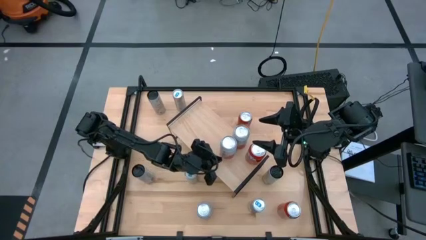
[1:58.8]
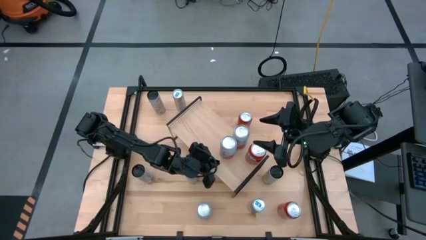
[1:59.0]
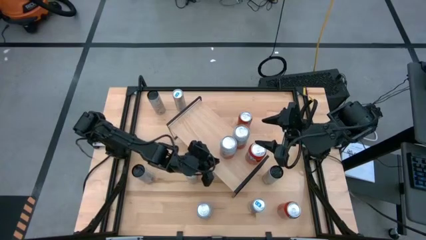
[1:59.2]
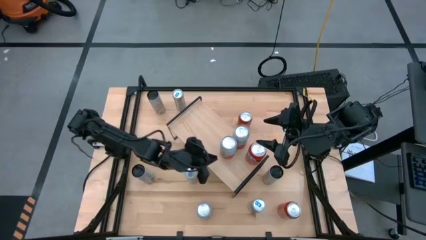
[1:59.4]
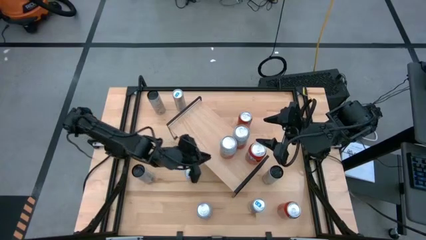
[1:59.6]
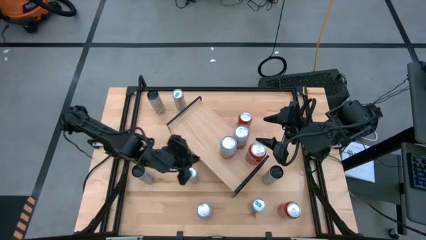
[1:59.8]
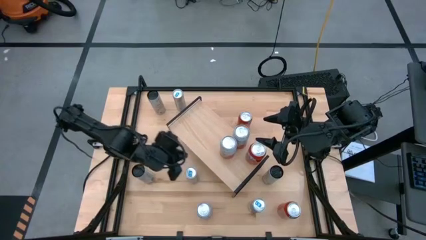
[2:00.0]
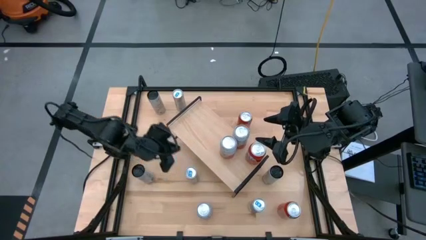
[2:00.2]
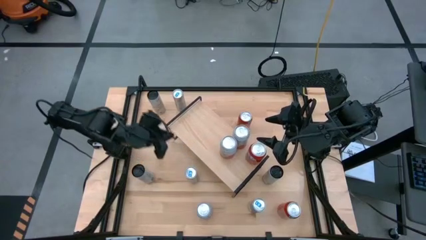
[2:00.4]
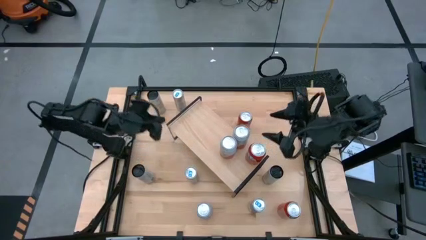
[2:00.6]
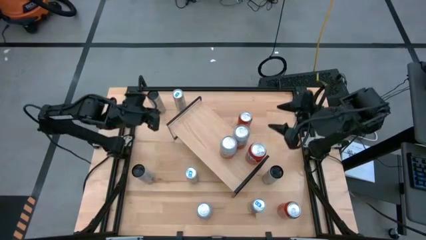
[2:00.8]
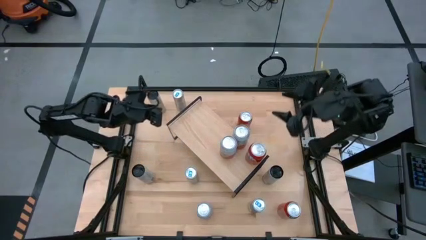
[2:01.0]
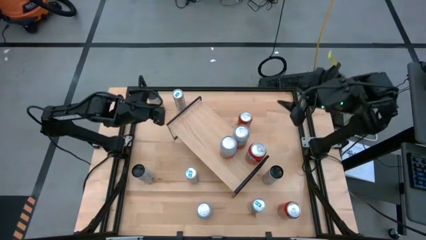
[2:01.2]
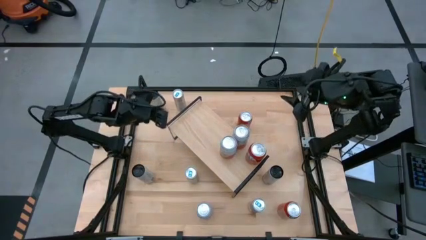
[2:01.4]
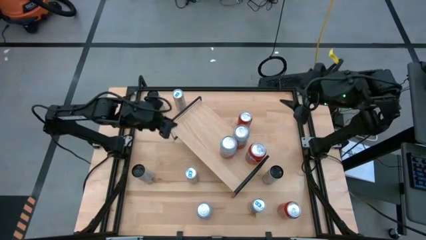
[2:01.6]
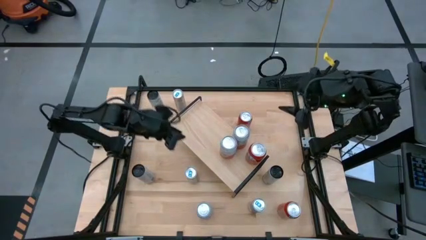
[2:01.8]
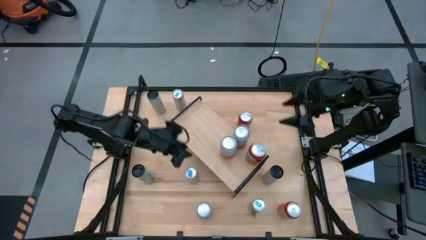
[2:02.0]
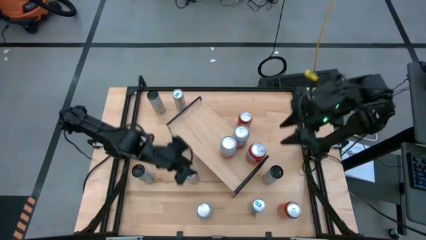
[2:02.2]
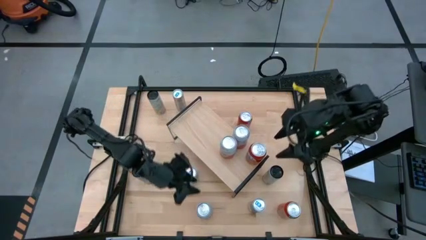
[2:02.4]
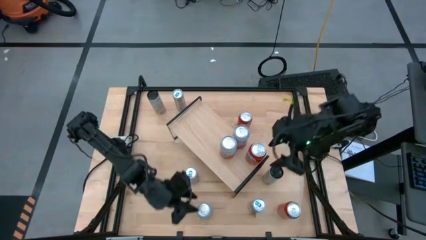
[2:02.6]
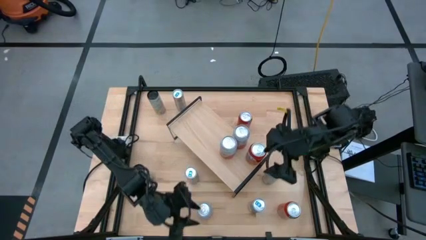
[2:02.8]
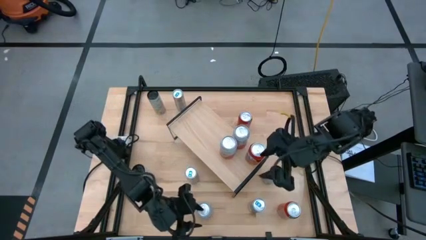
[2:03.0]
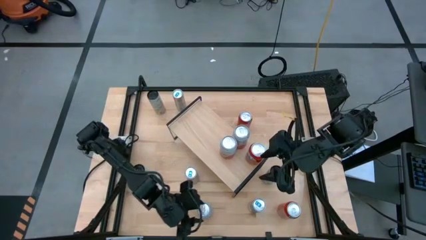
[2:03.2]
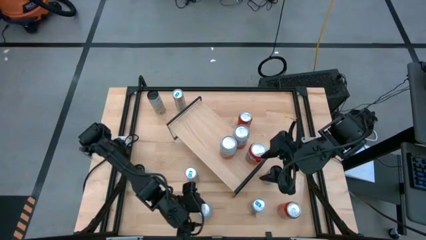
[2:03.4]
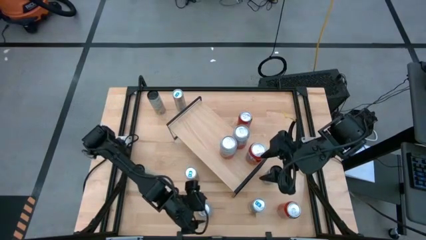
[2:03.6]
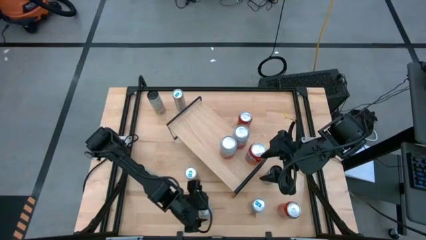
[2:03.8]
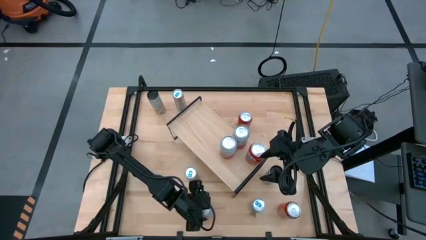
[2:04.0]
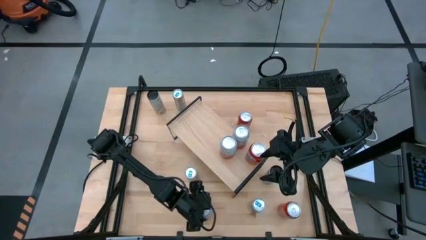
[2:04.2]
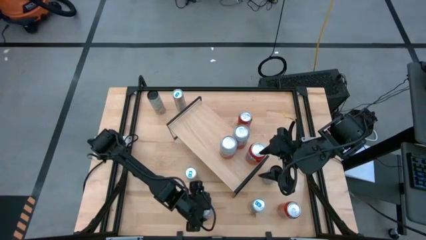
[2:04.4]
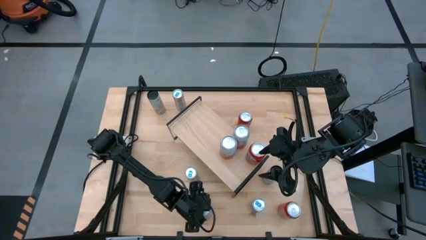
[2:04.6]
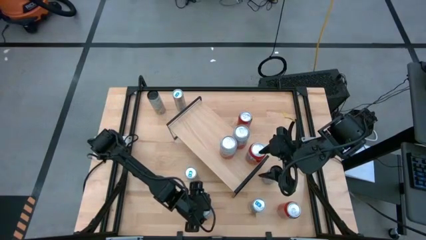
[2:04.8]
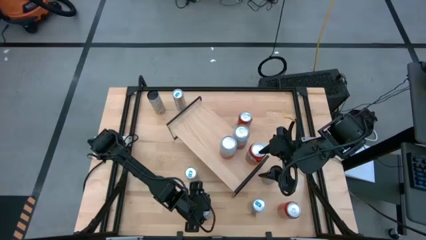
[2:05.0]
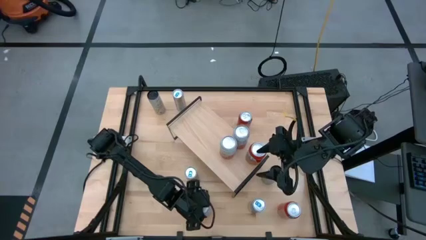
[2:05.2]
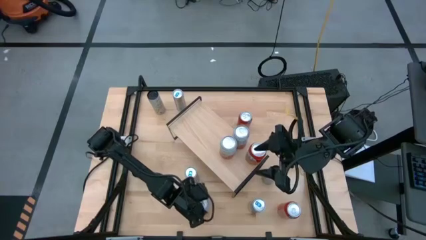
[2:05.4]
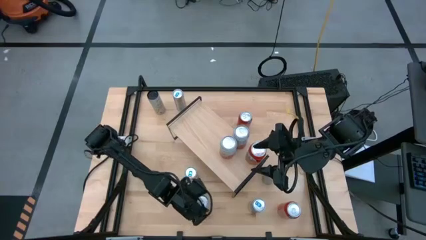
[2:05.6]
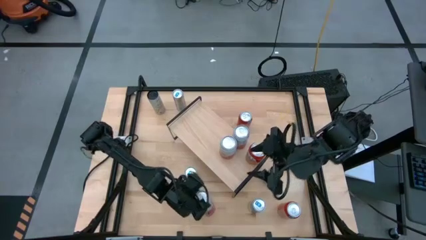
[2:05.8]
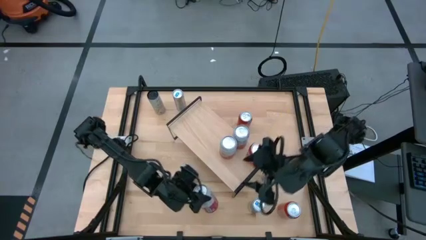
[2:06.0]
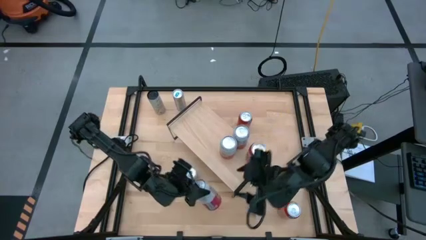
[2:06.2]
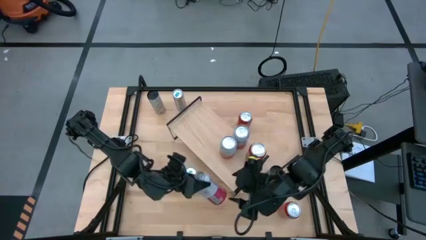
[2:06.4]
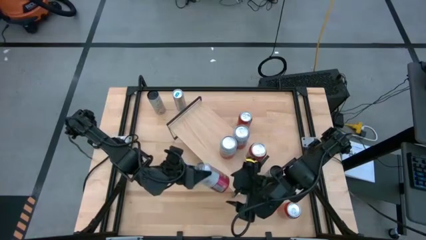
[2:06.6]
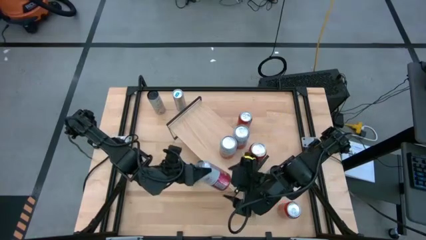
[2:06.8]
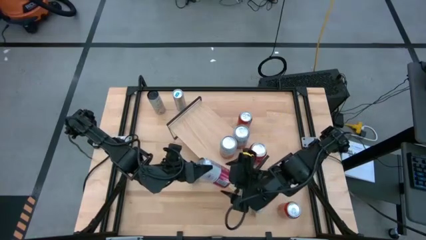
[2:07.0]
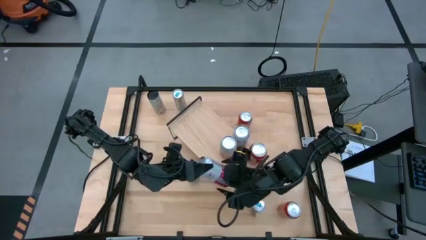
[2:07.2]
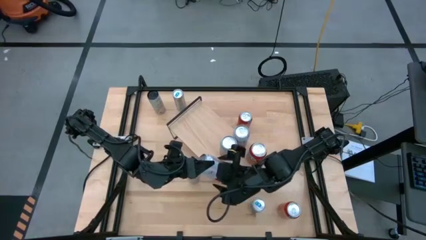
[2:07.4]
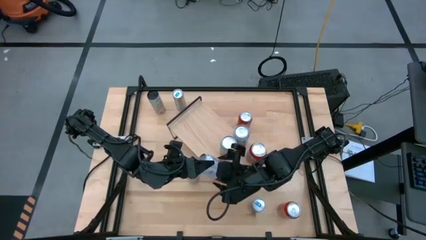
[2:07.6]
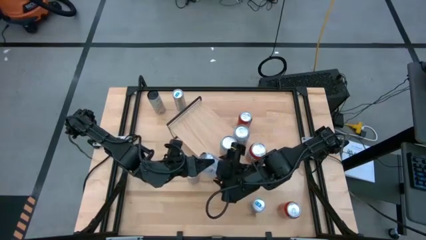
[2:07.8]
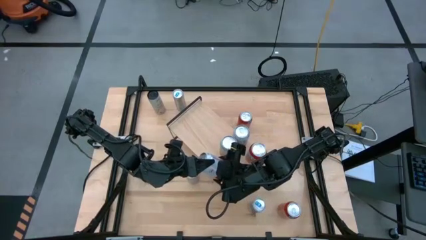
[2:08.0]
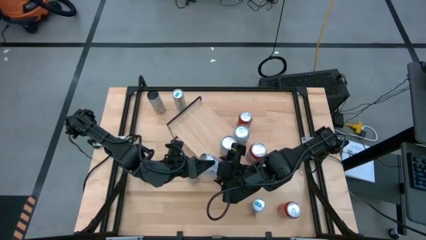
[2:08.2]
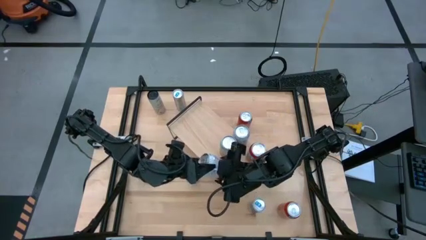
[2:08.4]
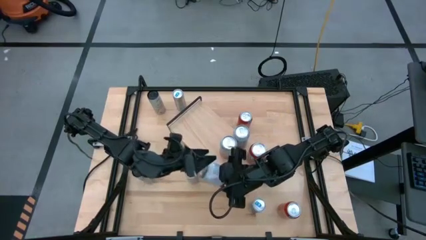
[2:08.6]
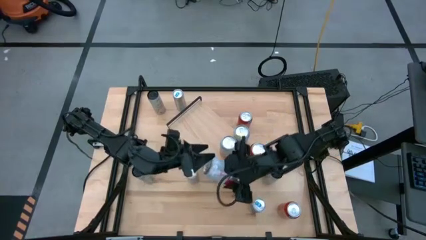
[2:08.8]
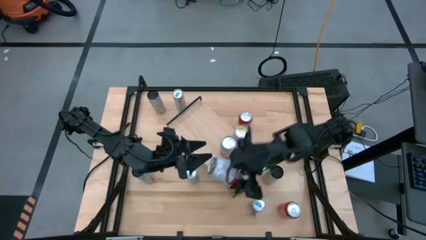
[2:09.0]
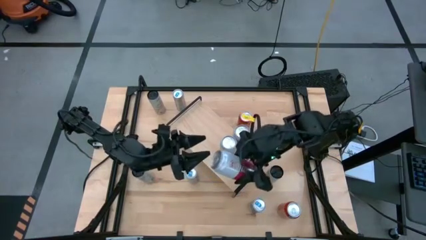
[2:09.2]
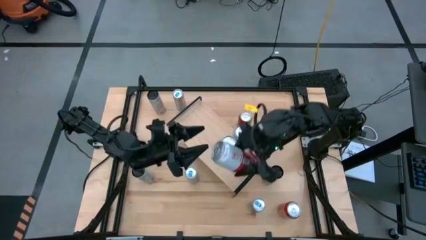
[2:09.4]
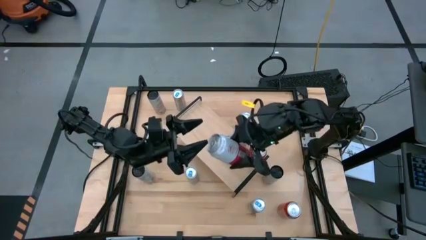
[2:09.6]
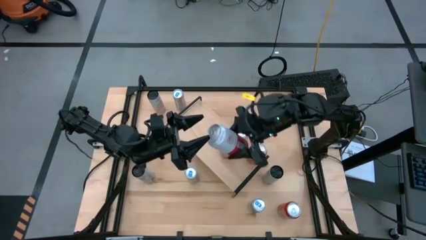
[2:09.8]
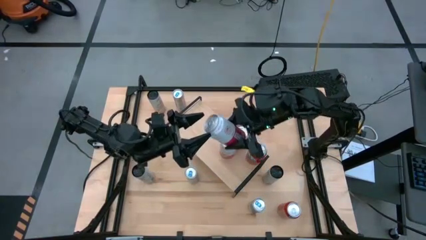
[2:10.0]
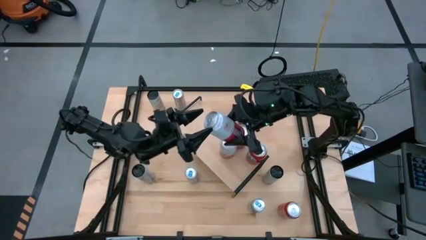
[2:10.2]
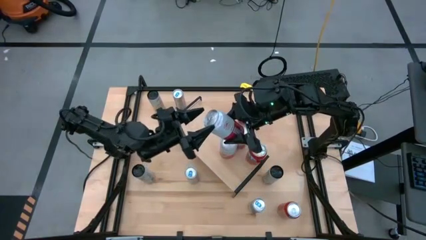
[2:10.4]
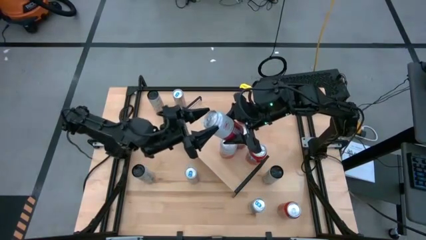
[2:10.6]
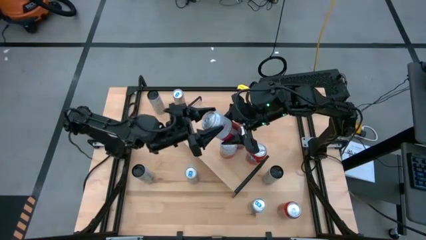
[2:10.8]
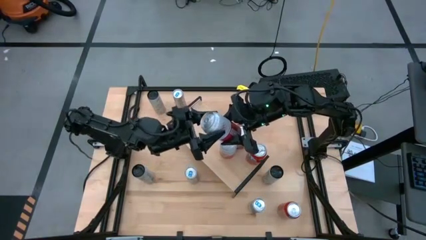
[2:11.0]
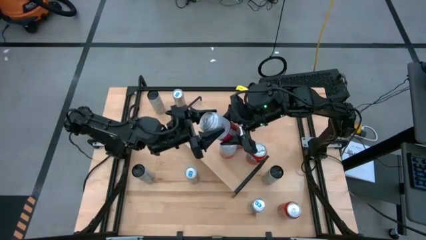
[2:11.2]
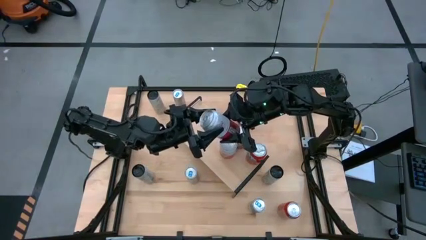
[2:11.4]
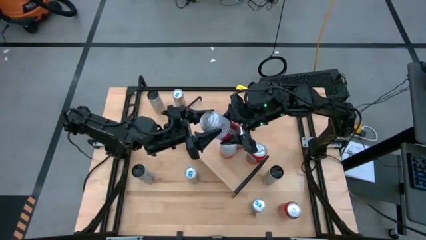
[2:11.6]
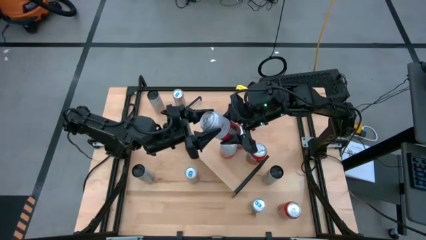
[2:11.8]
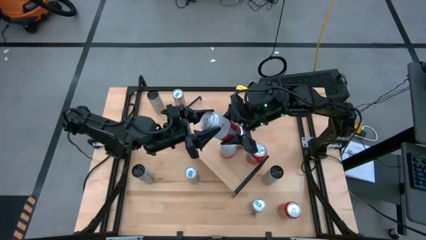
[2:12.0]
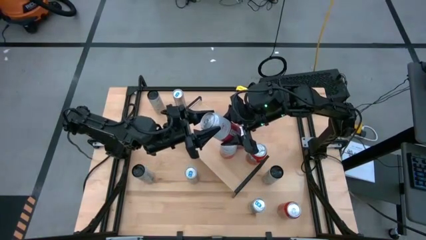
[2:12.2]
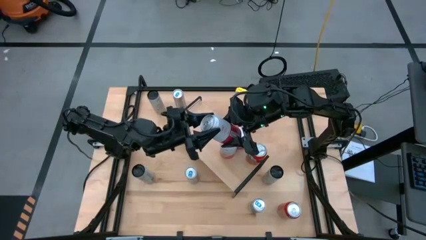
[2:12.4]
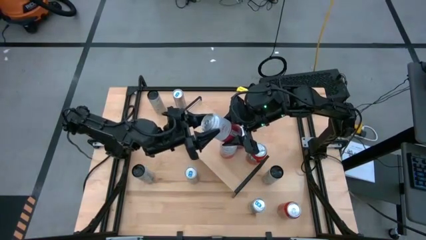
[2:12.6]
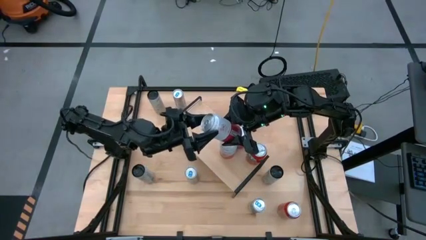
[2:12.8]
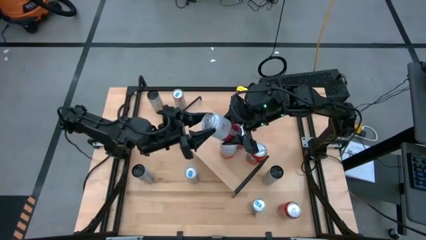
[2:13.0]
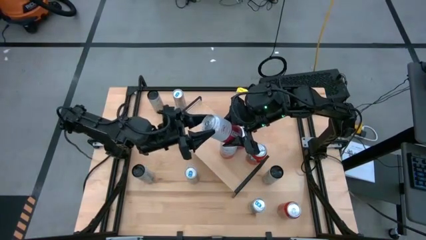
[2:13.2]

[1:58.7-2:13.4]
Task: Place canned beverage on shelf
Put the pink white soda can on the shelf aligned with the other pink white soda can

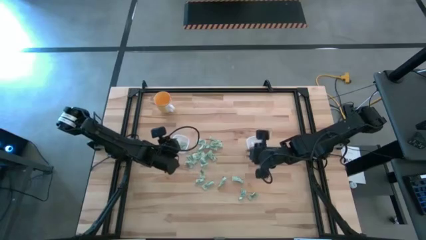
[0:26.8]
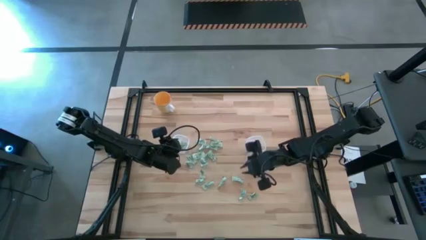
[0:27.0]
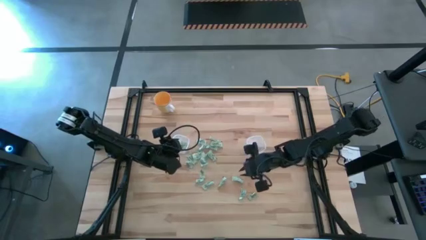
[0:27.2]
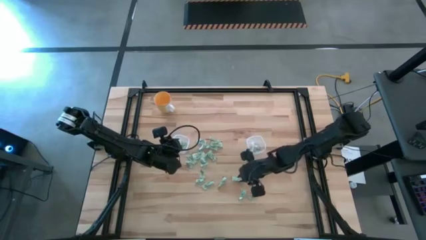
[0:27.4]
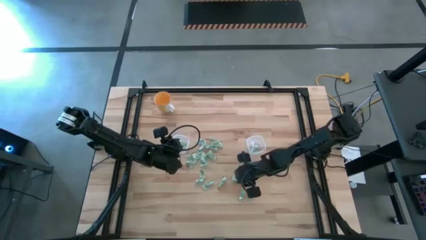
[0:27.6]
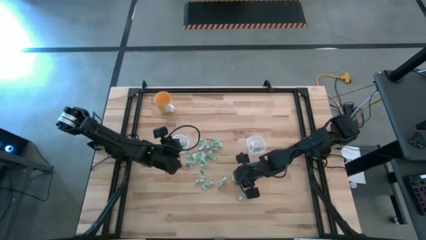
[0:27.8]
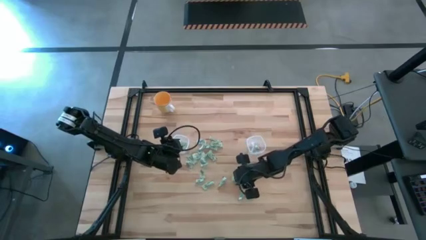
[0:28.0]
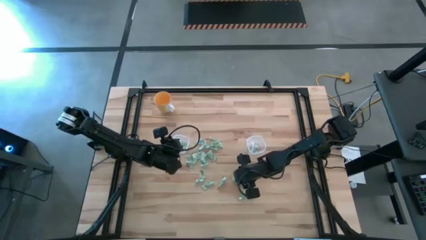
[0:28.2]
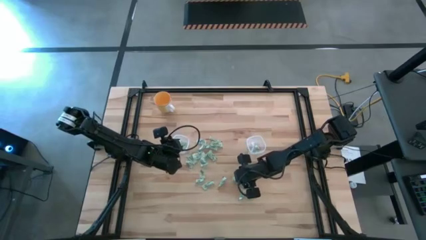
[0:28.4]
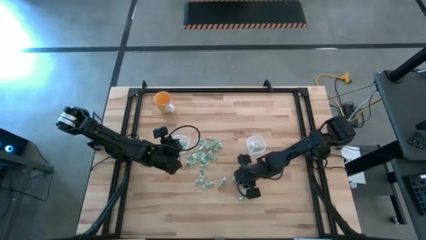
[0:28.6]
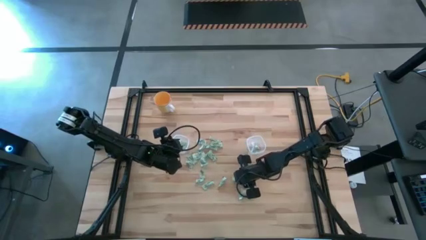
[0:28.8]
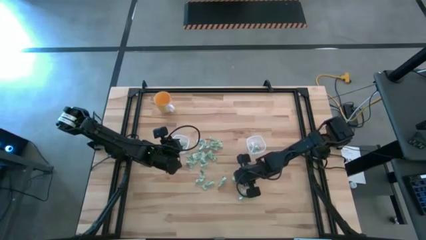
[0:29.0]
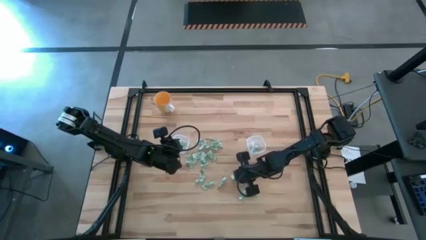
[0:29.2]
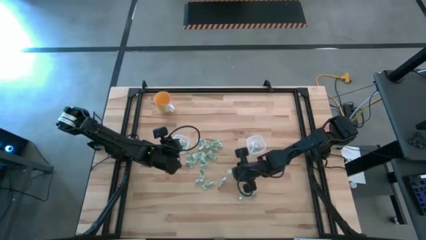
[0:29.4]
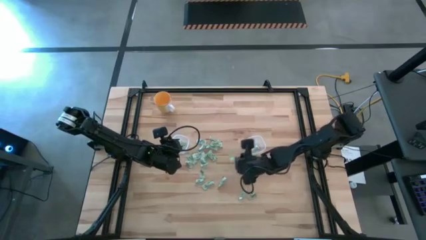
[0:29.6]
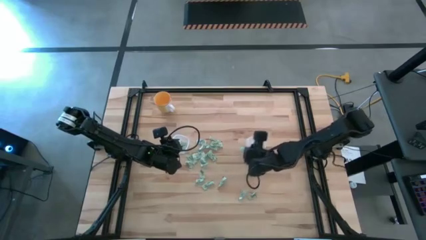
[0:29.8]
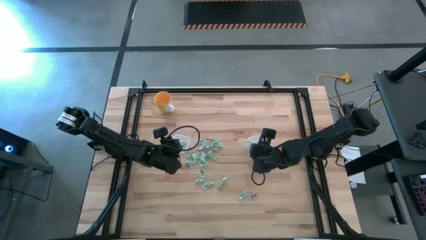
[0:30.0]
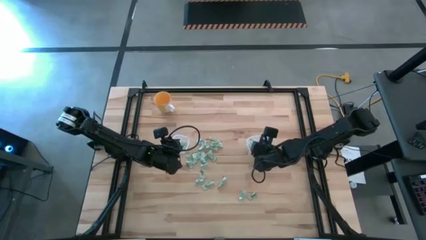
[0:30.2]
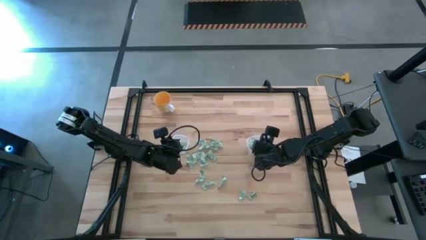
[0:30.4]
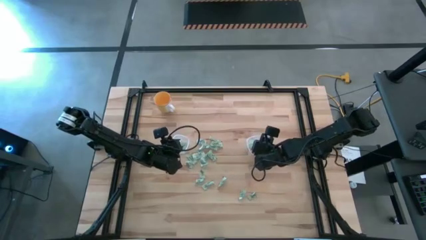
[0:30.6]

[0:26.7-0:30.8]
Task: Pick and place Stevia / Truvia into bins
Put the stevia packet into the right transparent container
